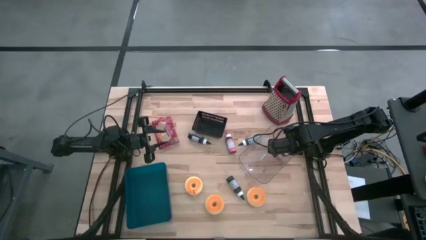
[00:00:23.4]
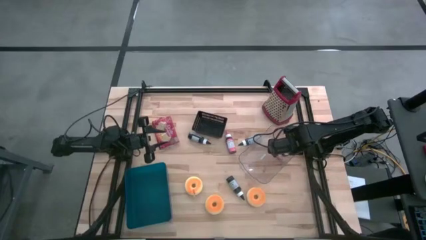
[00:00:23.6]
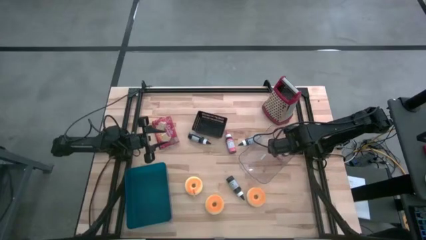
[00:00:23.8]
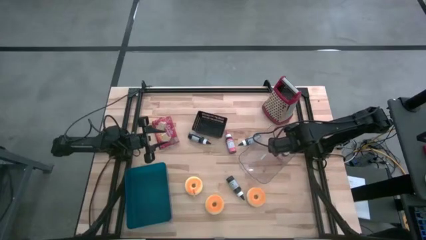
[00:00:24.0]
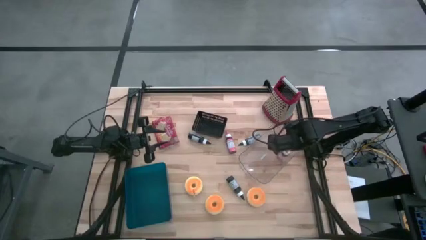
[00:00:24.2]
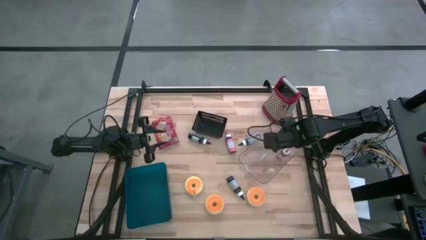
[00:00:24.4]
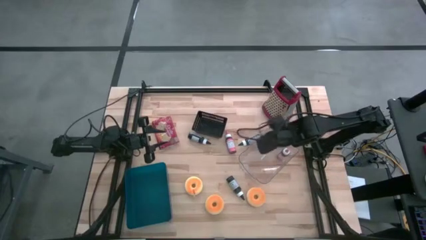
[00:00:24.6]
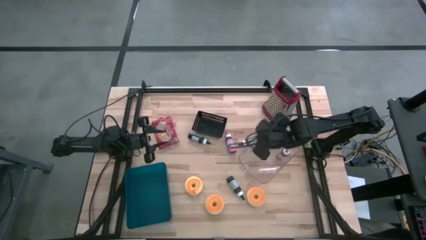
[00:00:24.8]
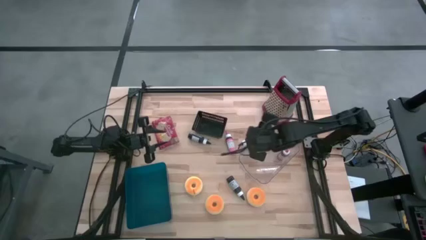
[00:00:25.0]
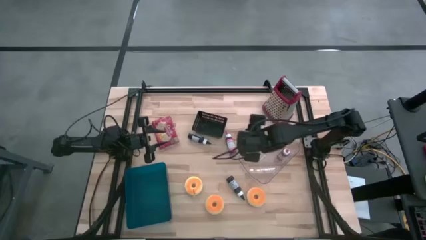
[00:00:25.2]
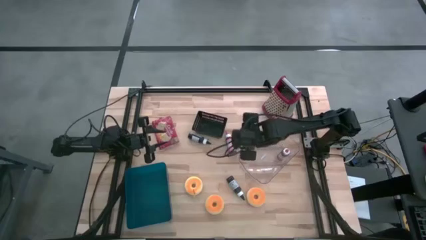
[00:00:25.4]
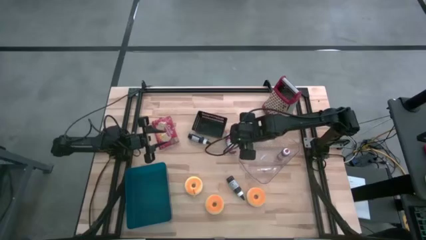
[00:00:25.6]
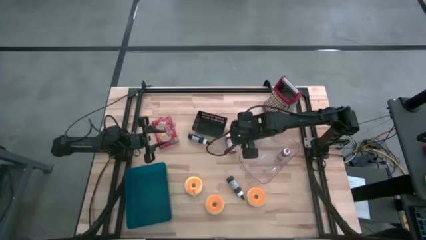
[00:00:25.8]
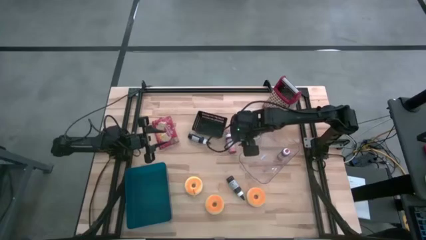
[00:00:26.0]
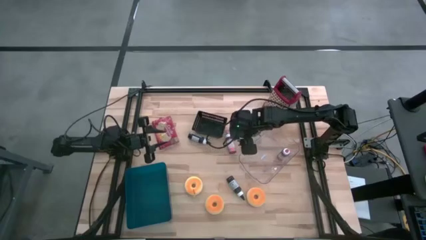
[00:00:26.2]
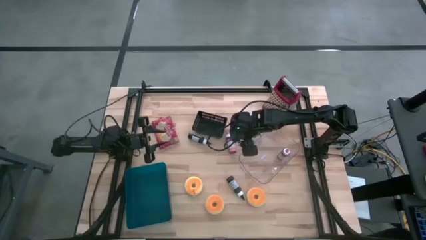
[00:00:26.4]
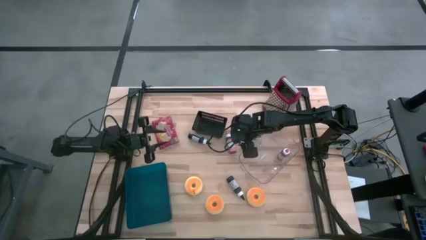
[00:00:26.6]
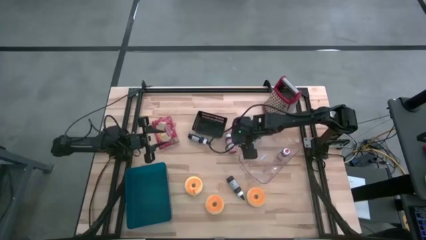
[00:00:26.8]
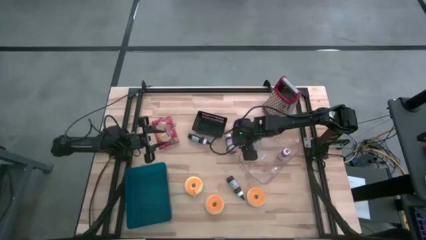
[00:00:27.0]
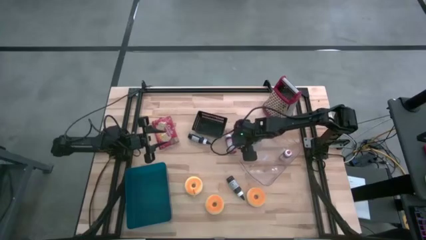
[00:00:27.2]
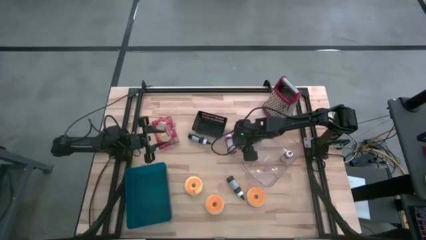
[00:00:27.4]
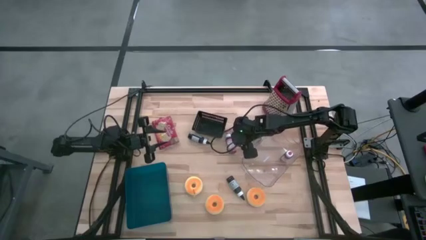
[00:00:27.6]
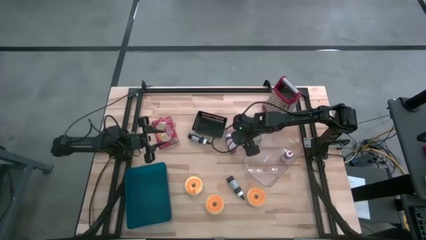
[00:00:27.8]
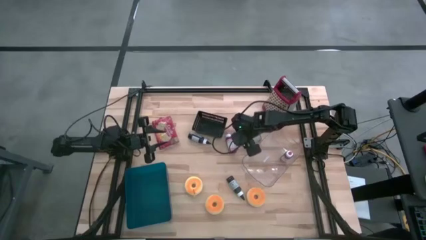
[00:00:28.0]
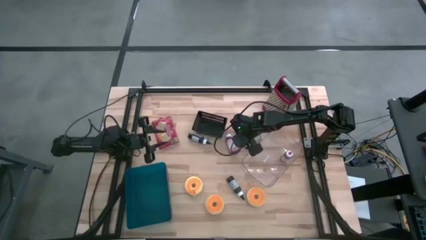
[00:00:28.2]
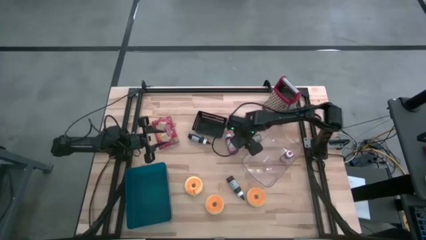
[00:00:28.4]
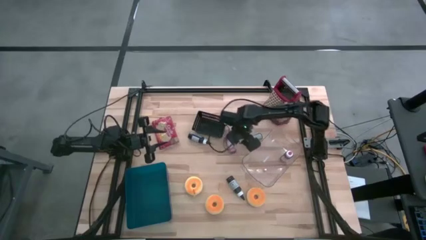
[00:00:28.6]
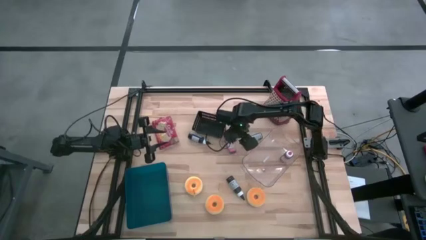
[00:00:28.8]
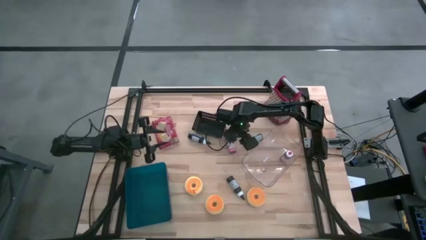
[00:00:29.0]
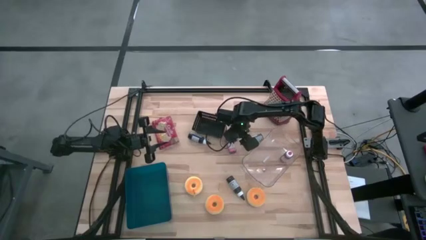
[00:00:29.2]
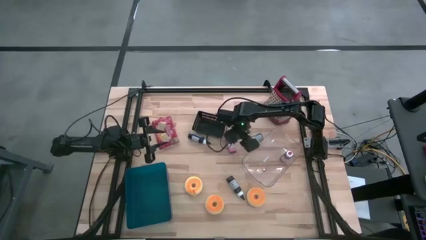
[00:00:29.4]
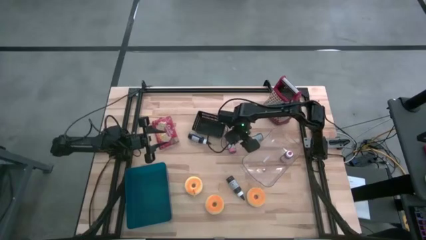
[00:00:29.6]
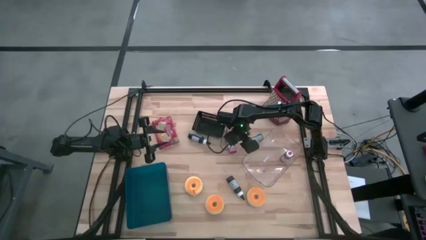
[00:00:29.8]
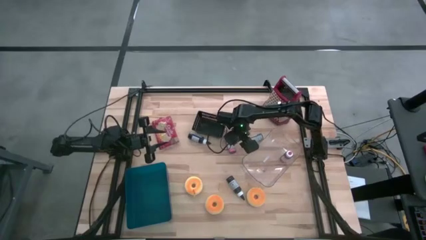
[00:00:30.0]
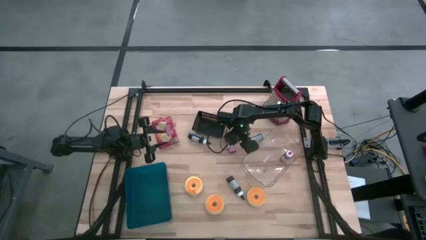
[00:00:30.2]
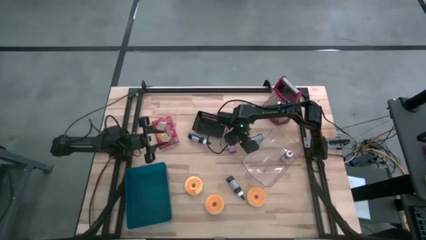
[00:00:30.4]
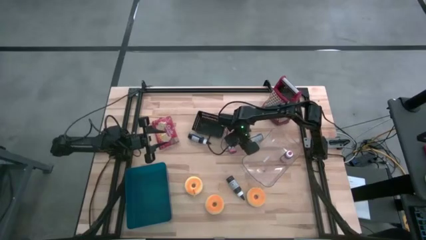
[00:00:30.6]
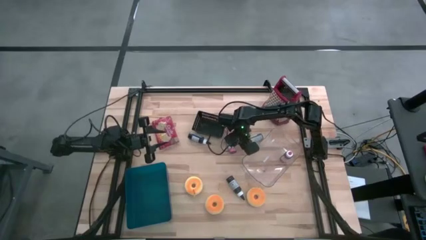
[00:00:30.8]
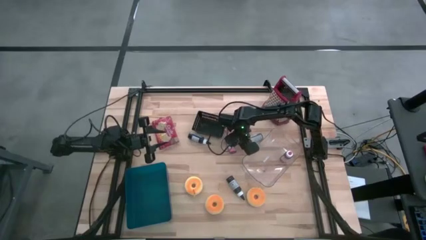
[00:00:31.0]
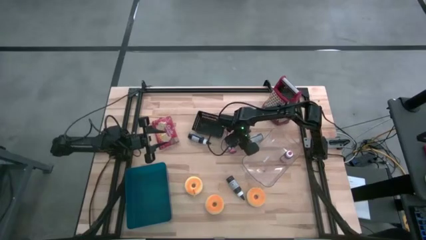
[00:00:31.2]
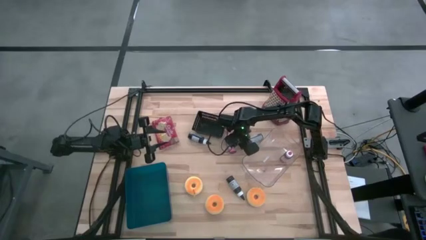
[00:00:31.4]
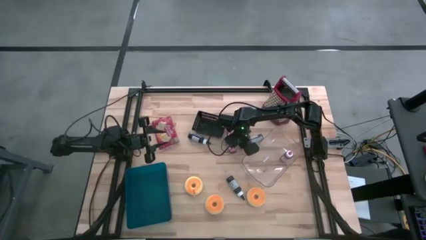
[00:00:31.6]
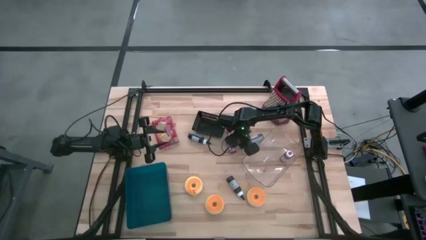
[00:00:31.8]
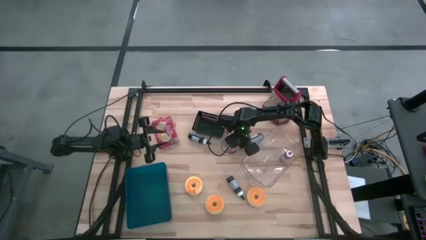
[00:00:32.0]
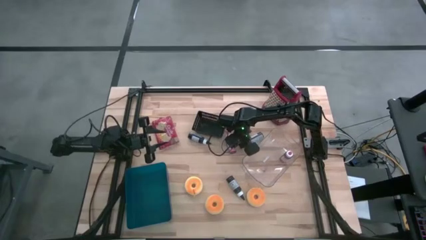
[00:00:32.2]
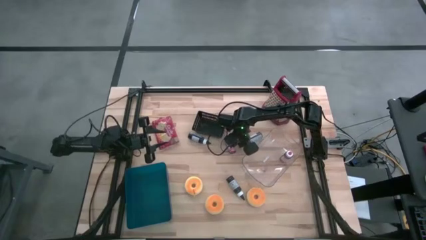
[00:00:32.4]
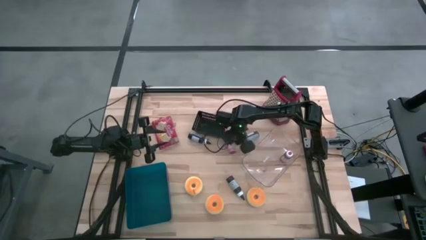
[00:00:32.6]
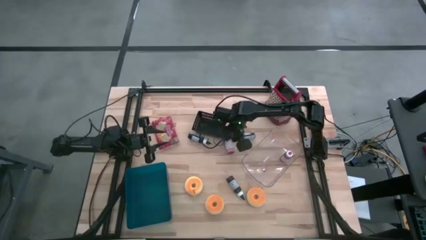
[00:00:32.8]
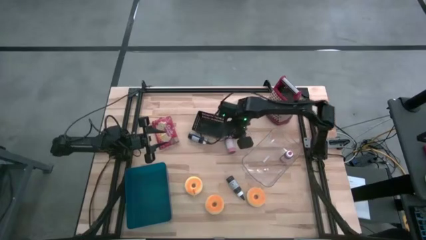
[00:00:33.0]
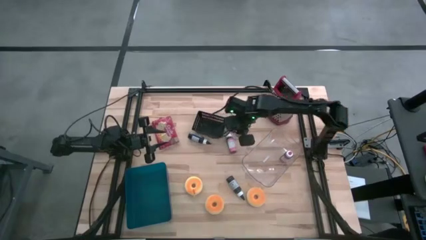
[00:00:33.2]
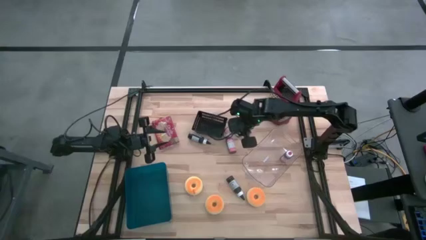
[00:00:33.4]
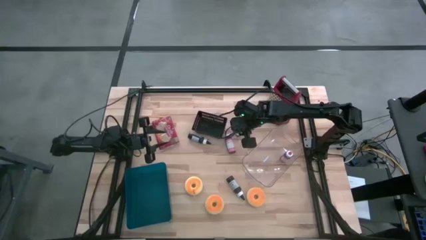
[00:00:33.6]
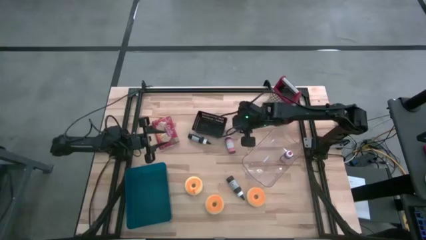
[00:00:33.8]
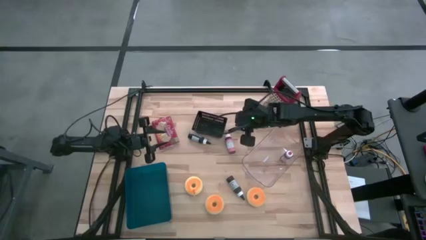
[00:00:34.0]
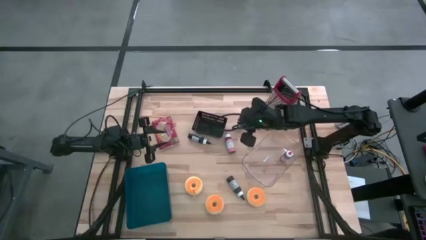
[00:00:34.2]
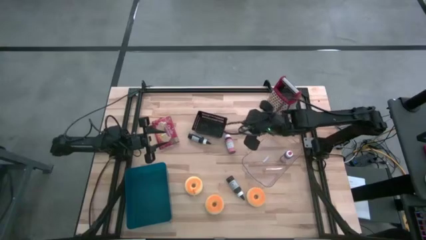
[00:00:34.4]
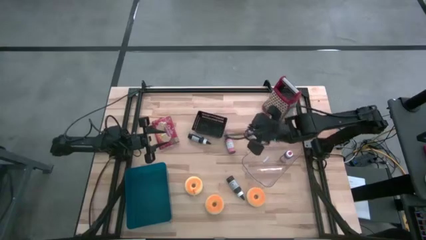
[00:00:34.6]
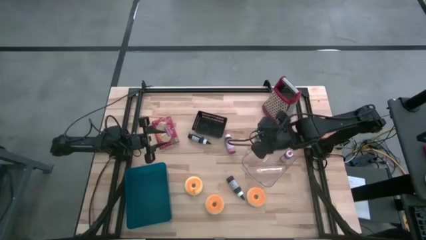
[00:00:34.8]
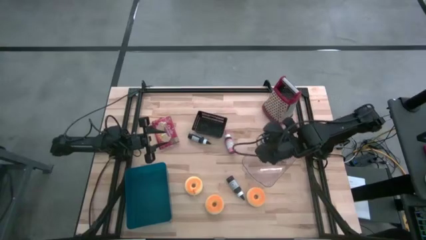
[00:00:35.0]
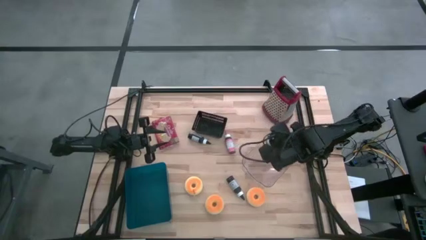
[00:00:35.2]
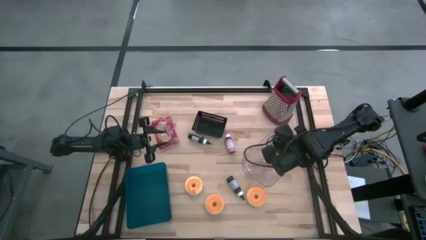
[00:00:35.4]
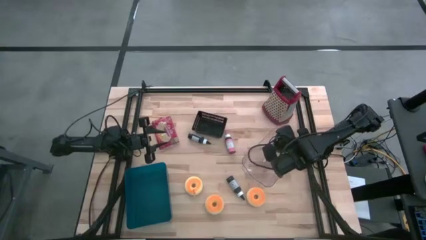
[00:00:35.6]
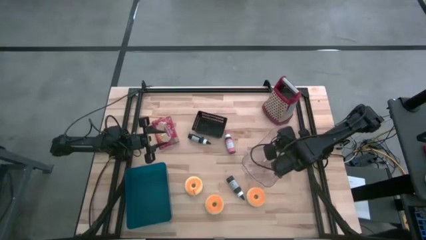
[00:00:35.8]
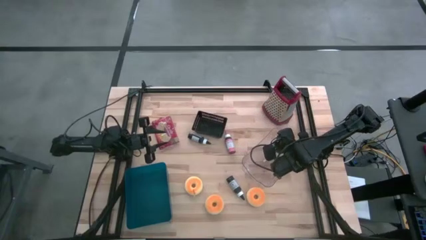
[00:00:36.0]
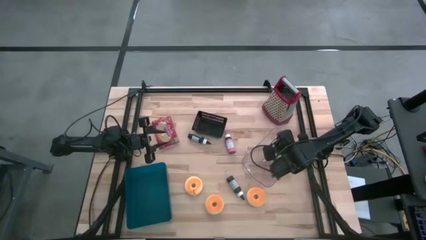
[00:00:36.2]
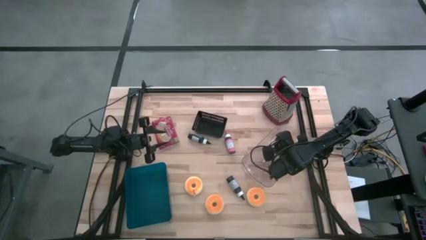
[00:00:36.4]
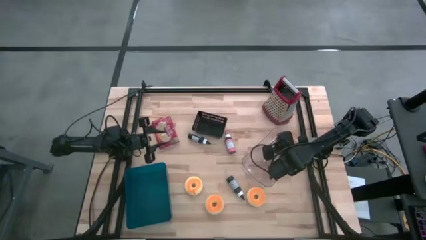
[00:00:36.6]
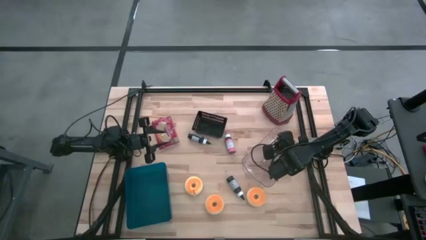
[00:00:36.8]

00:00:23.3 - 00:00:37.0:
Task: Pick & Place Food Item
Put the top right black food coloring bottle into the transparent bin
